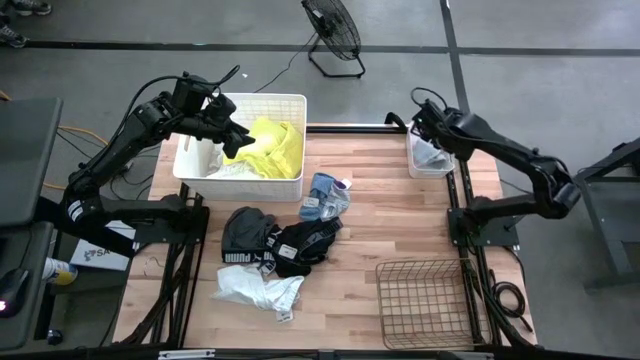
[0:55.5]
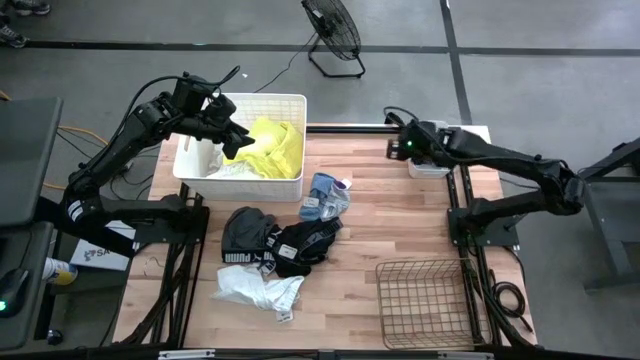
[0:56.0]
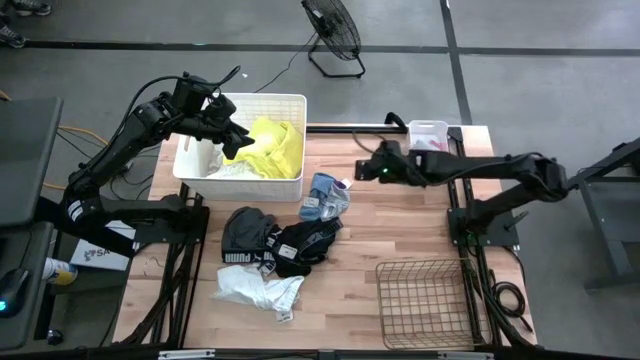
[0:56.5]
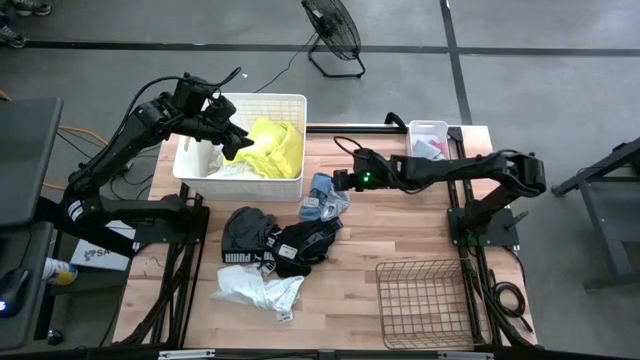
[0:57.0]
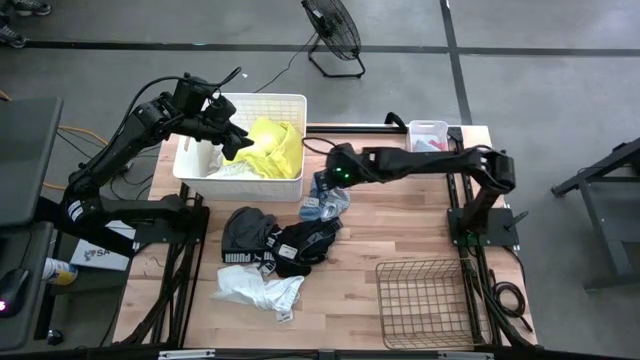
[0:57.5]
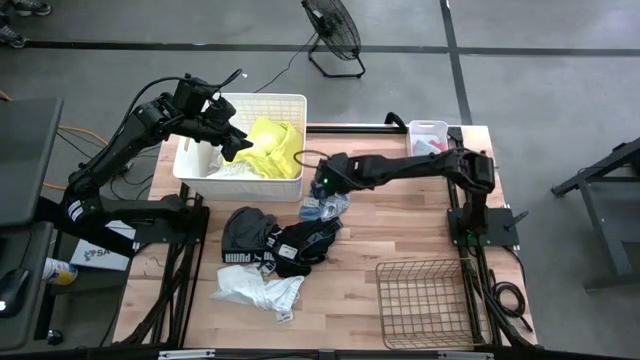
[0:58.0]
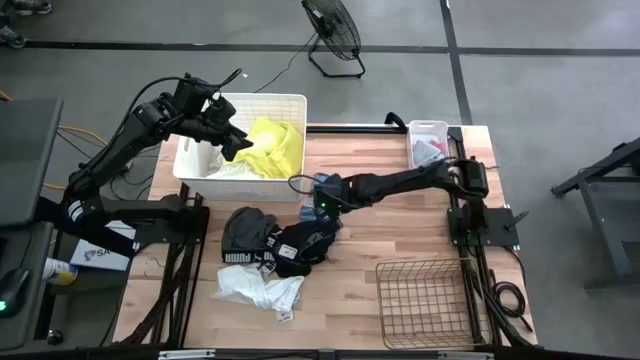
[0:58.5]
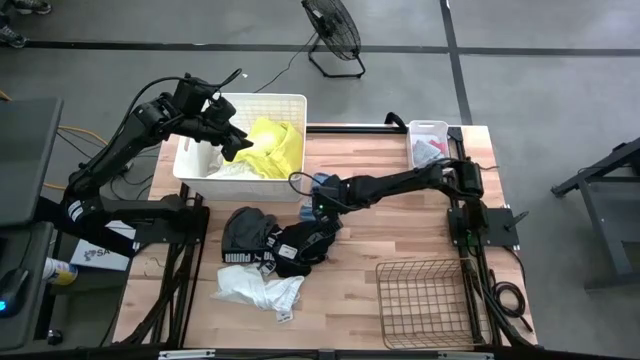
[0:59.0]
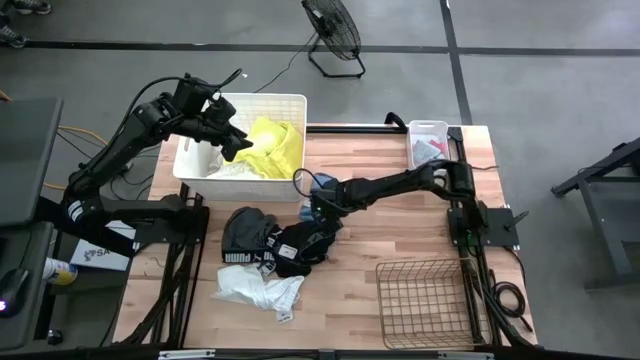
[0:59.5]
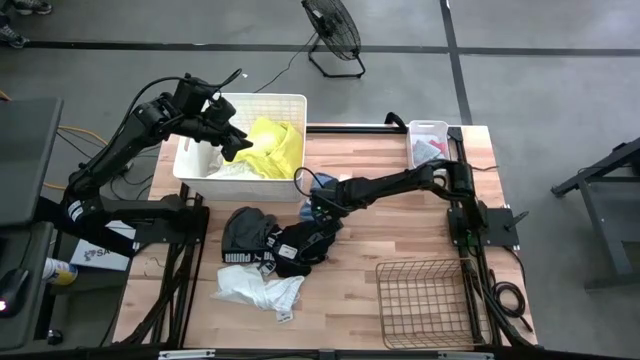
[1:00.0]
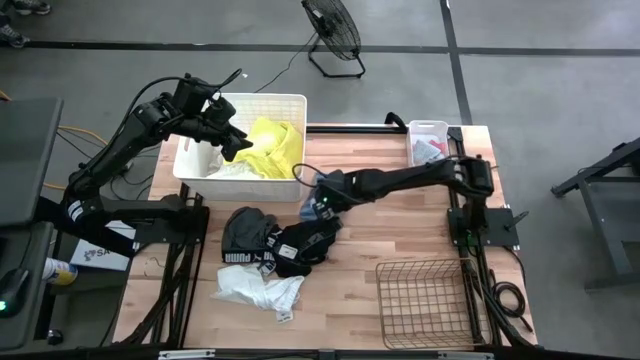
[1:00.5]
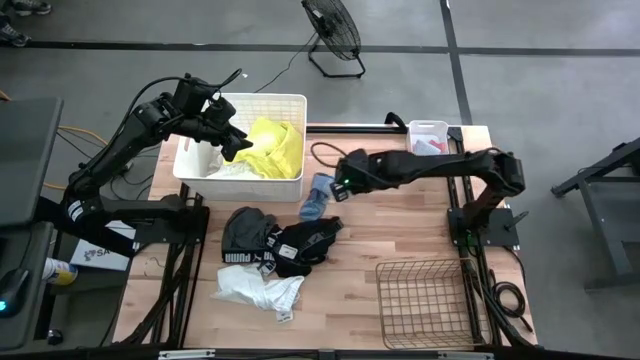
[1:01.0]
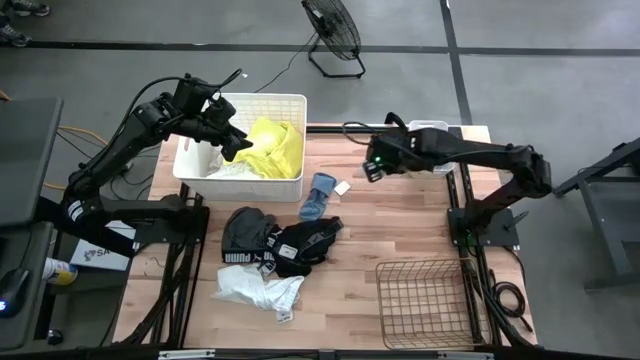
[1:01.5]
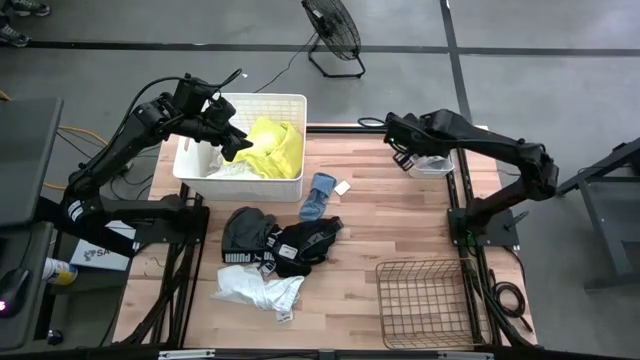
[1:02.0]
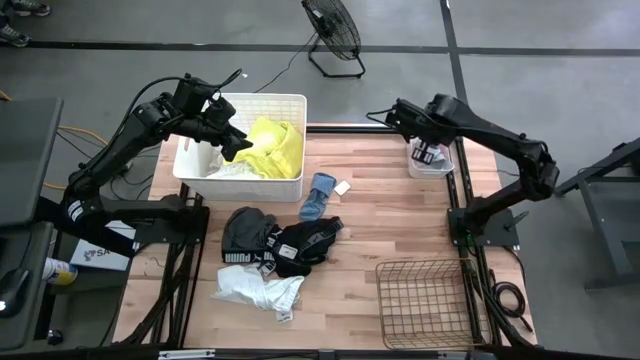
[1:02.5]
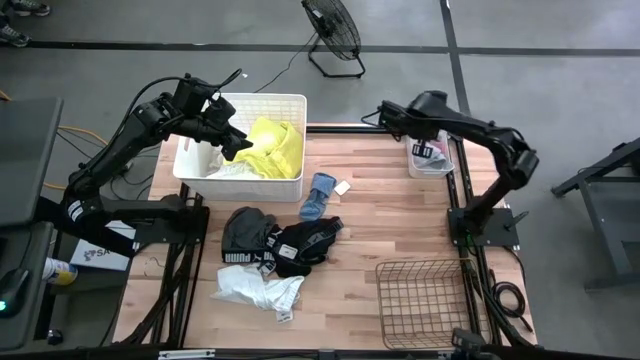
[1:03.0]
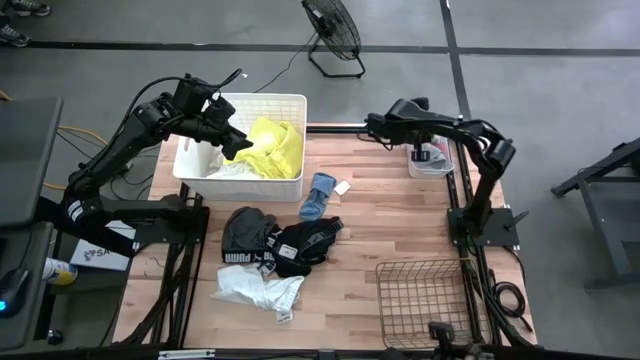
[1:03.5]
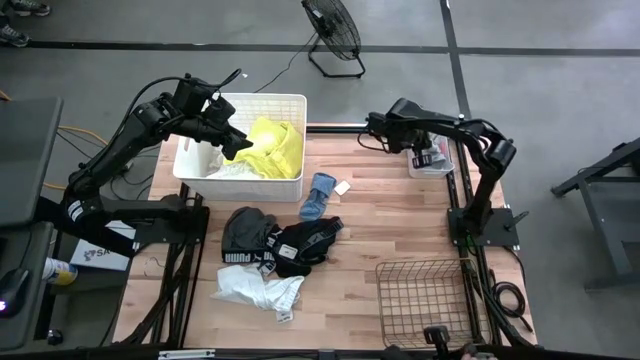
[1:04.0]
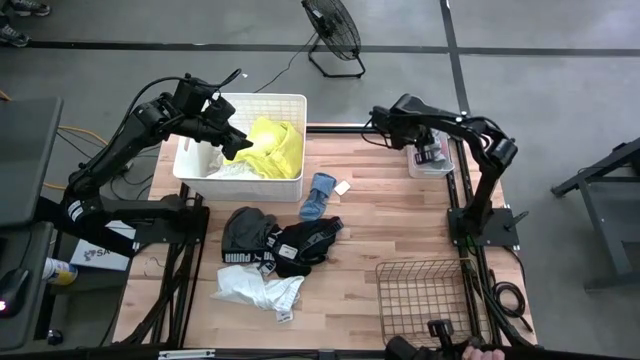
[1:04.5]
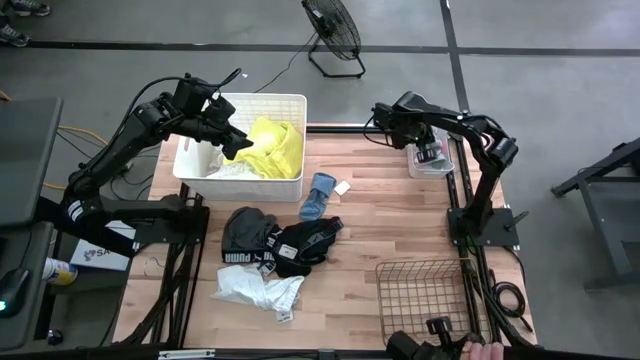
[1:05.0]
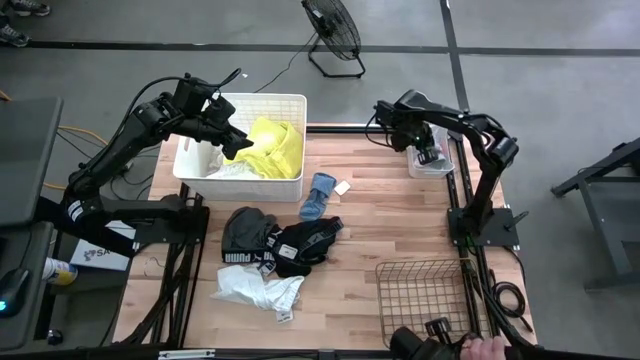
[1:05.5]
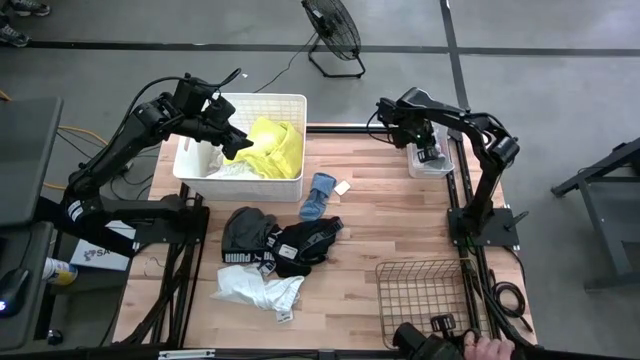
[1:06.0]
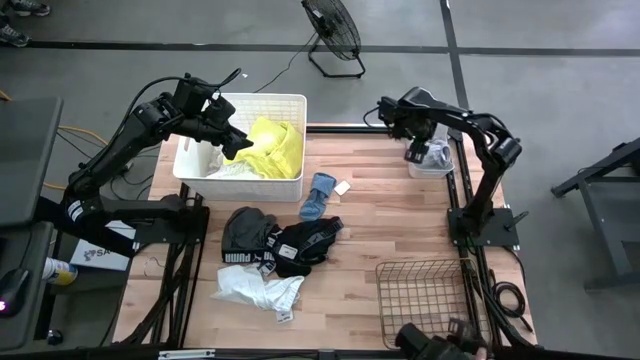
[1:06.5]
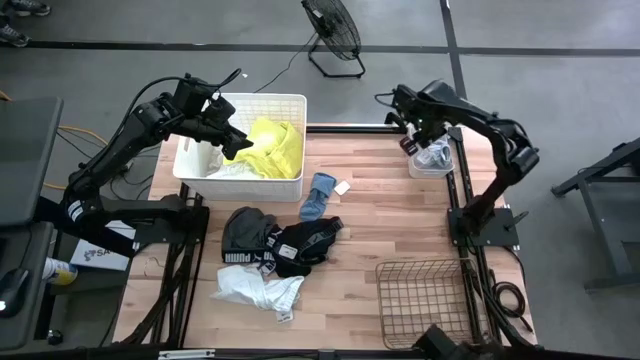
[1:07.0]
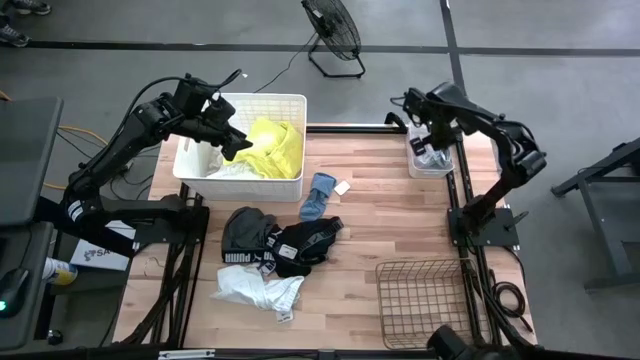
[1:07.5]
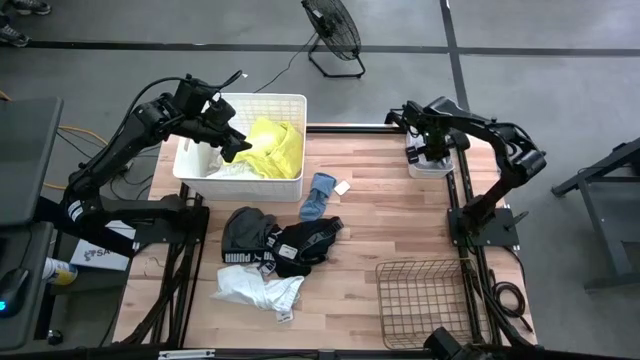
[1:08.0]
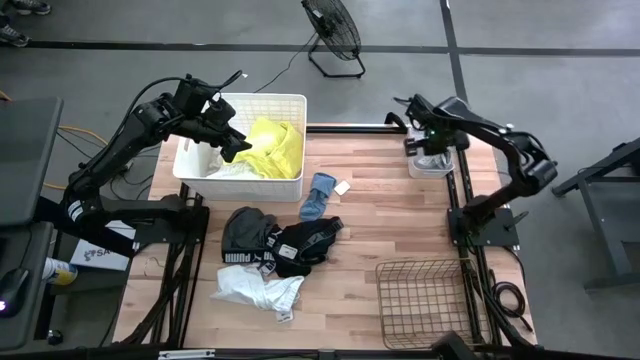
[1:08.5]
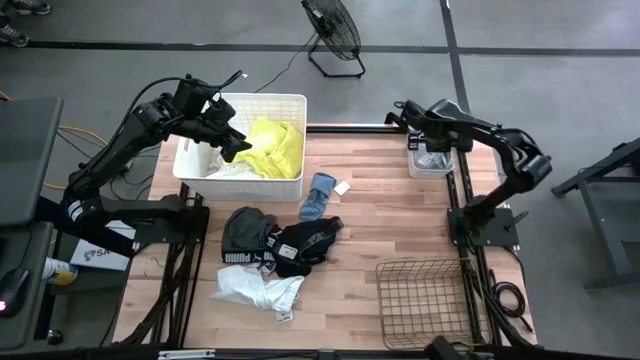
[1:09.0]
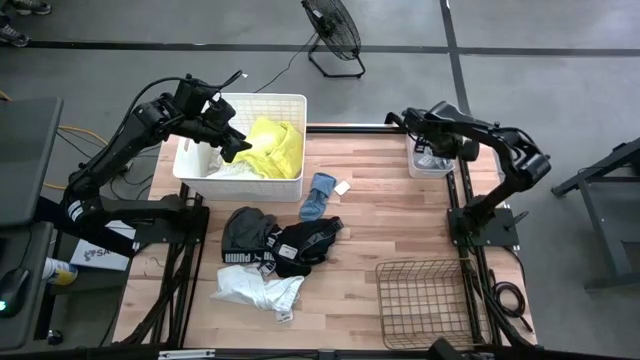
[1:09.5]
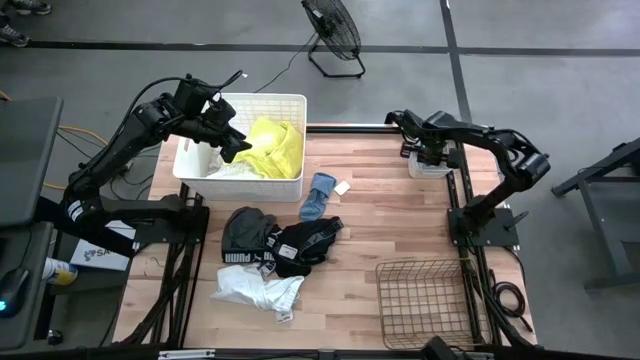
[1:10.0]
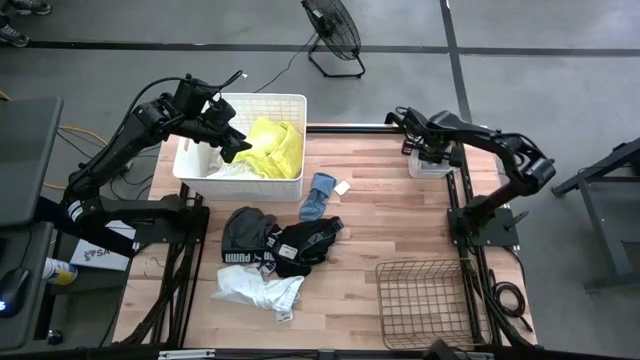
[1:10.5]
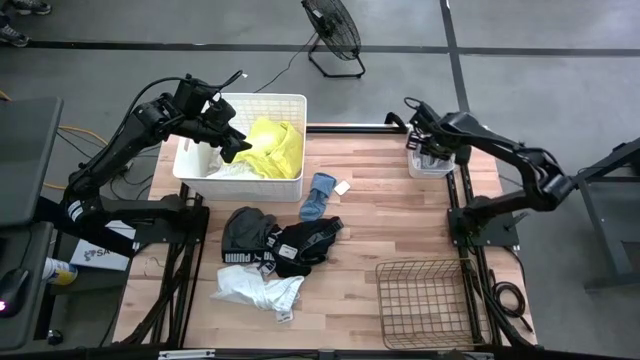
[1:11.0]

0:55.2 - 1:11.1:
Task: Pick & Place Cloths
Put the purple sock into the small white bin

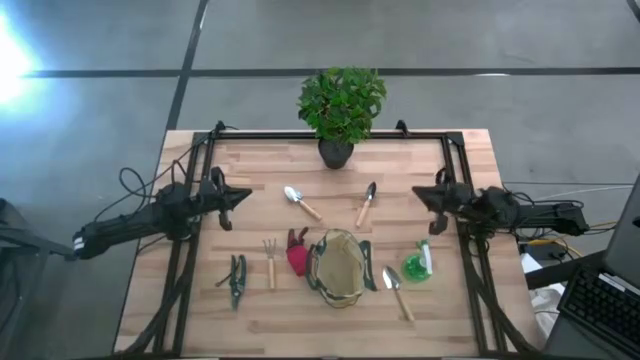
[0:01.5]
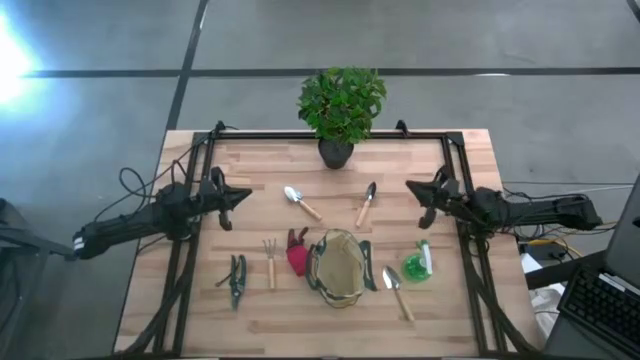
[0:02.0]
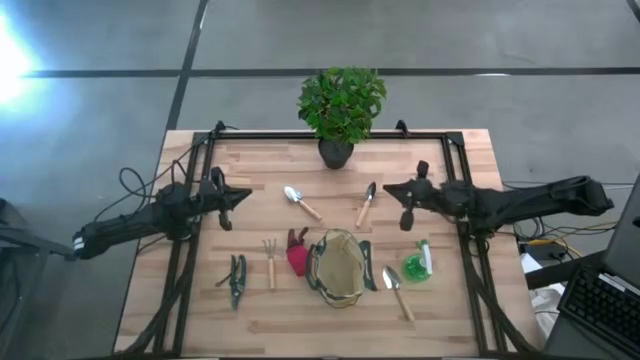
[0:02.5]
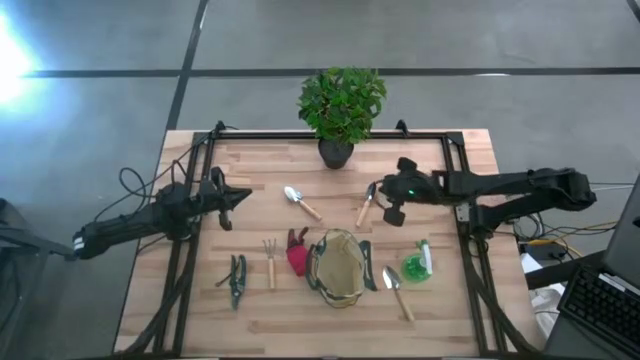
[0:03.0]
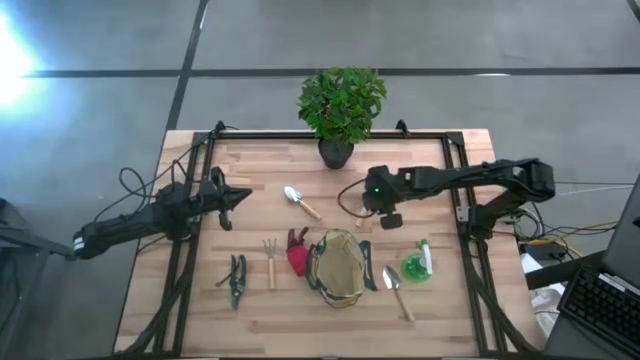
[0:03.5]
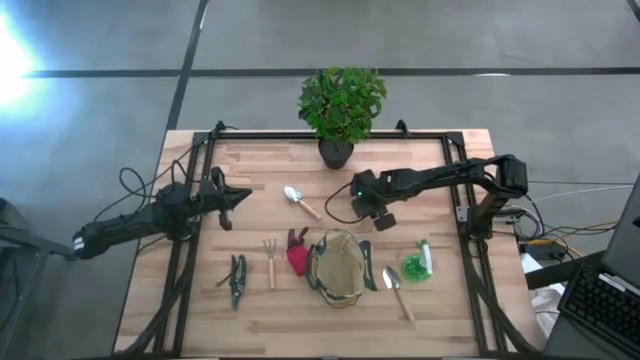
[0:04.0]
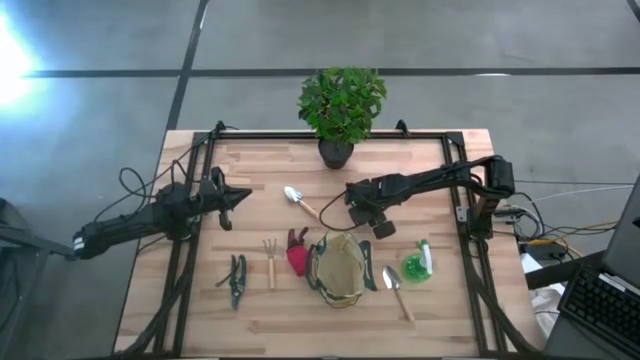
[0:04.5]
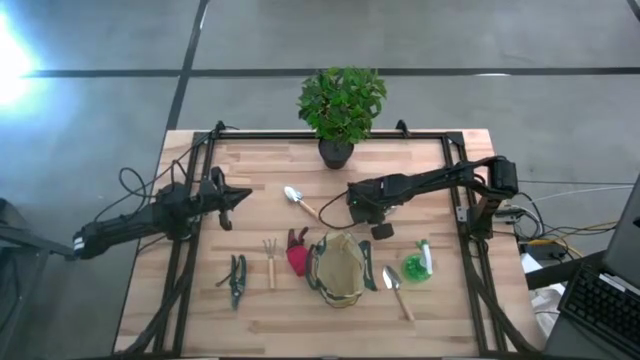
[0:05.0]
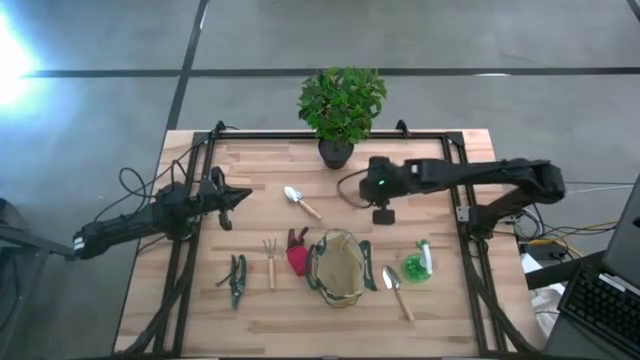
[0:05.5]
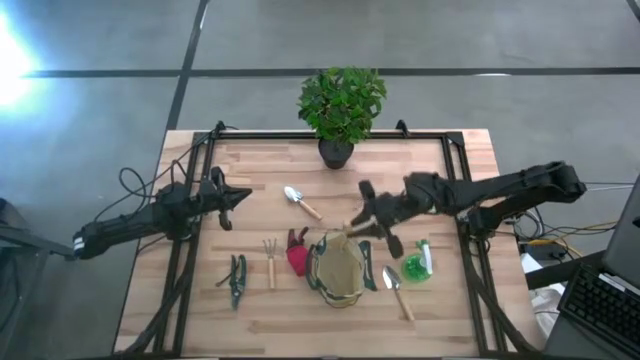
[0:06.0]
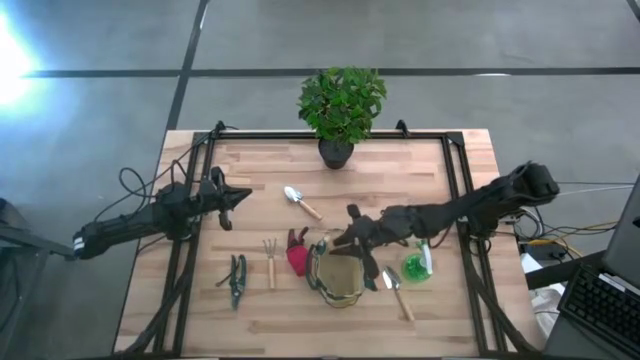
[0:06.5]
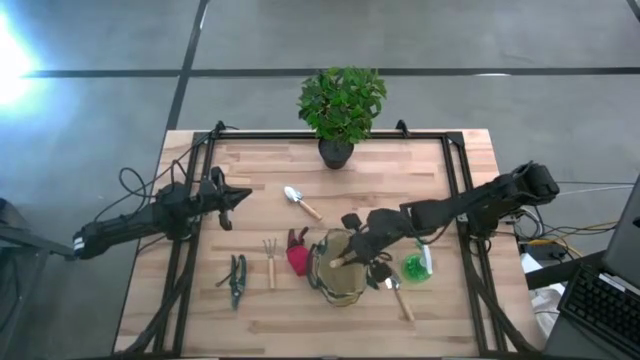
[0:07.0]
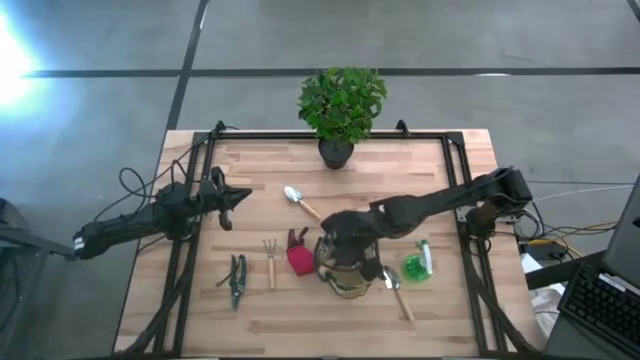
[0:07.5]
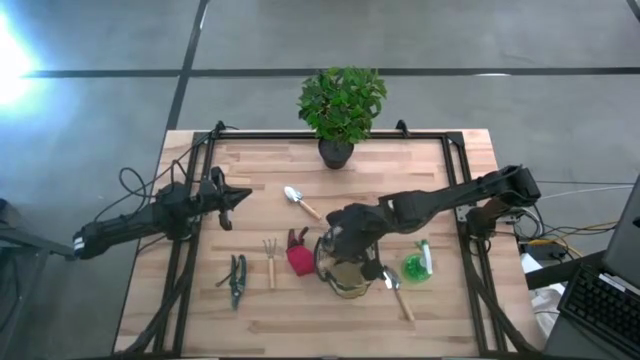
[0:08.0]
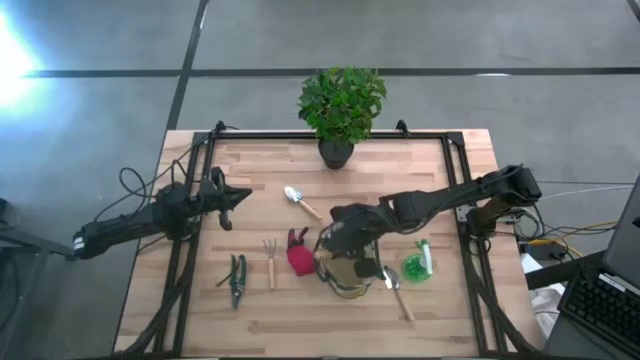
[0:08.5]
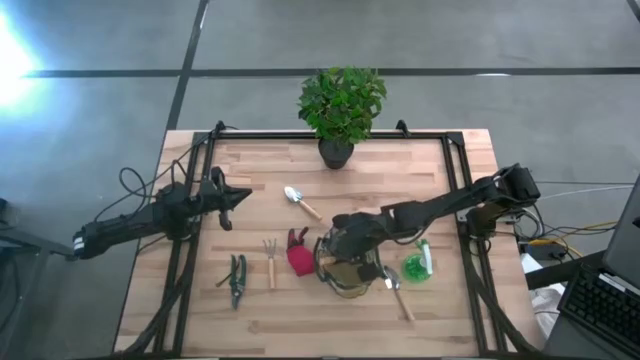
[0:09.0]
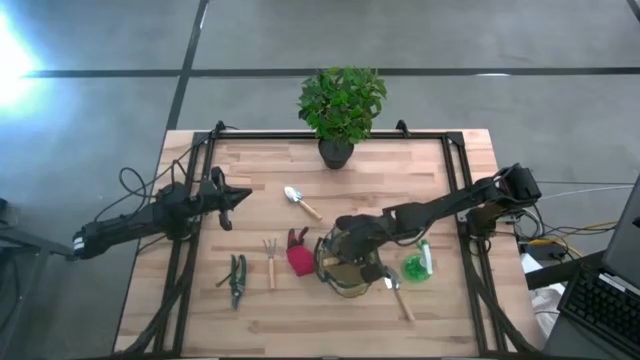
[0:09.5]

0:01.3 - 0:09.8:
Task: Pick & Place Garden tools in Gardening bag
Put the top right brown trowel into the gardening bag
